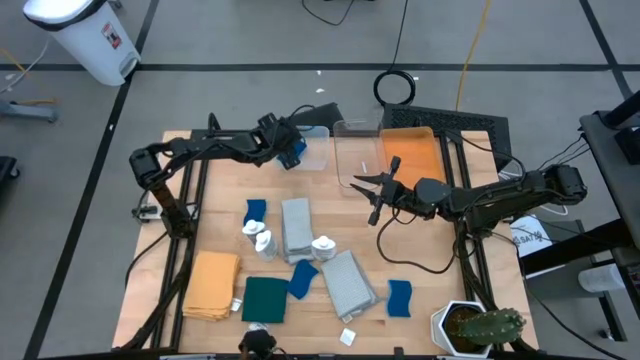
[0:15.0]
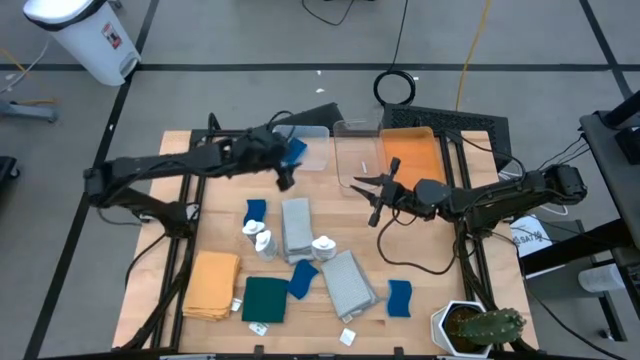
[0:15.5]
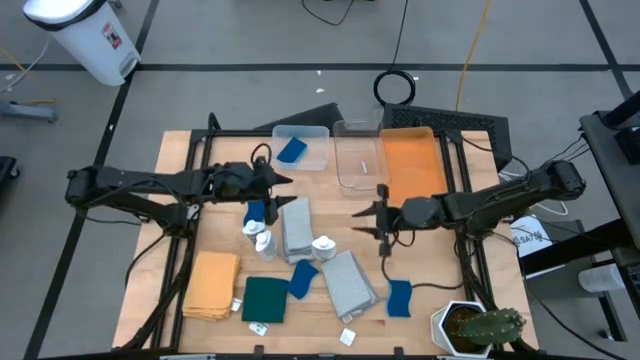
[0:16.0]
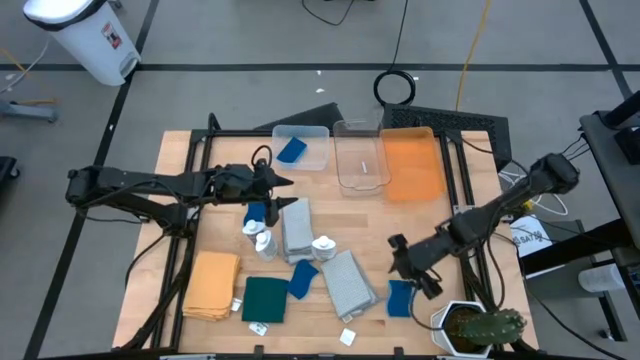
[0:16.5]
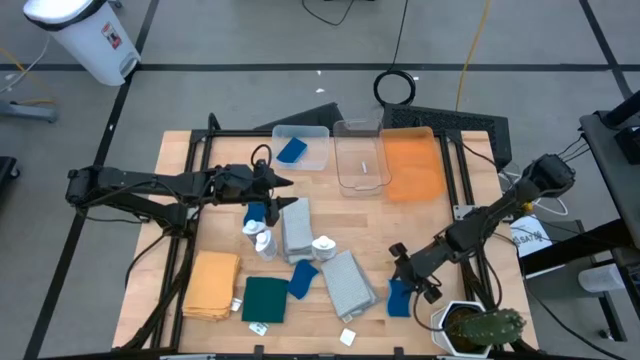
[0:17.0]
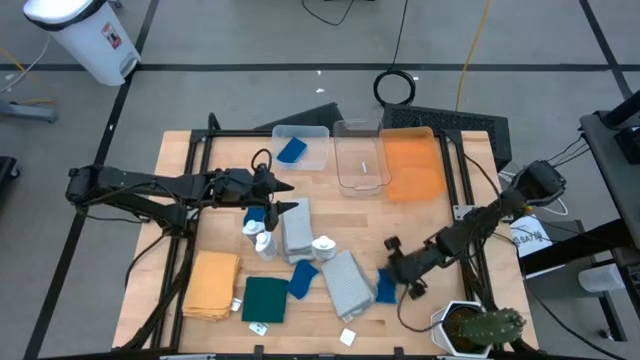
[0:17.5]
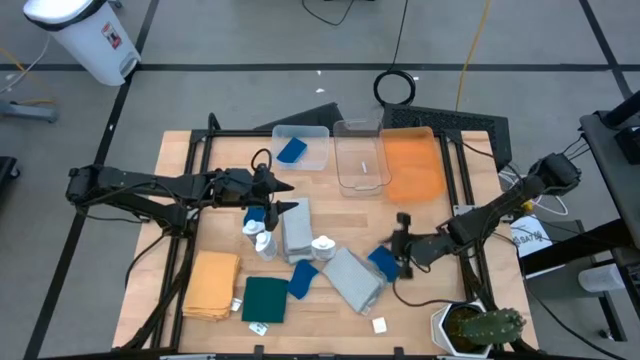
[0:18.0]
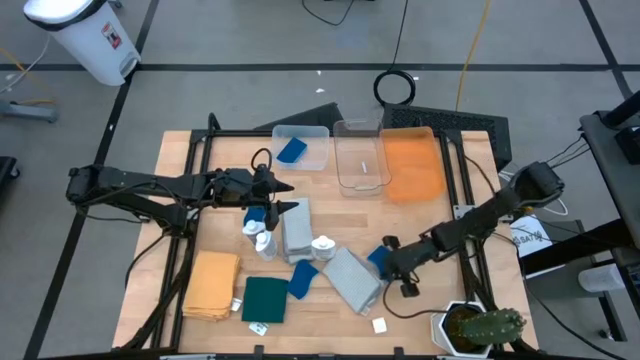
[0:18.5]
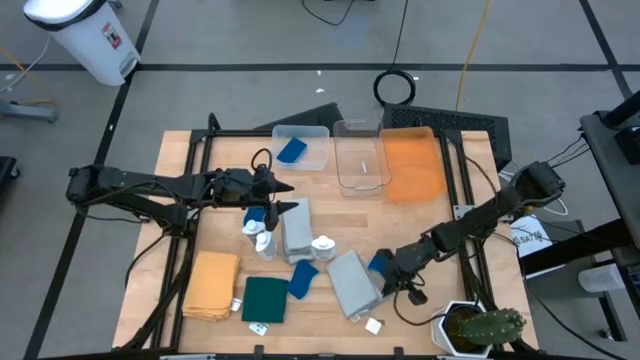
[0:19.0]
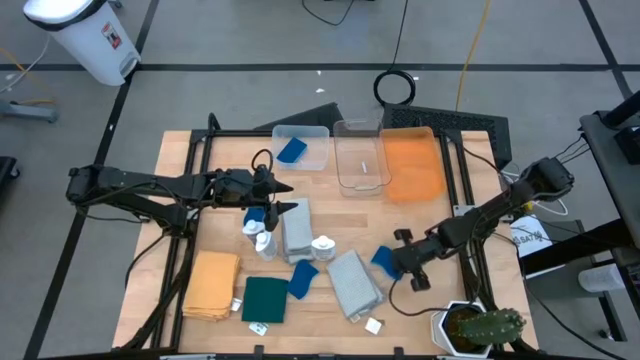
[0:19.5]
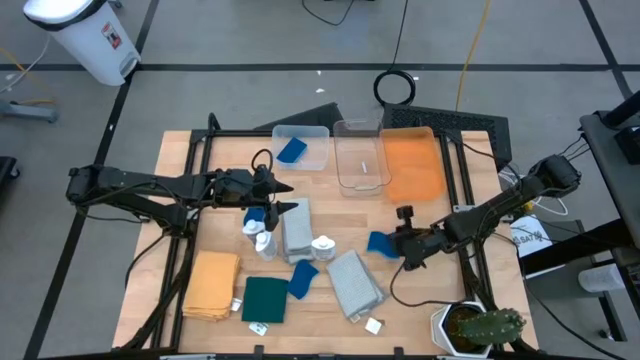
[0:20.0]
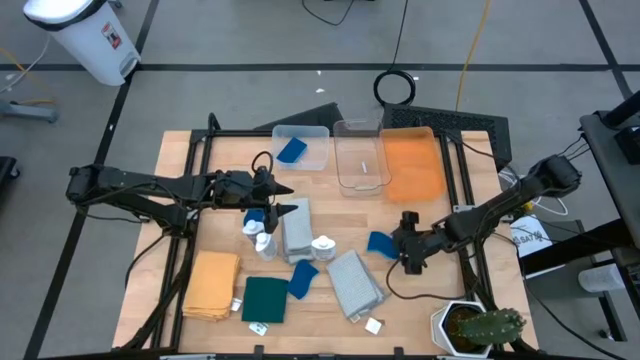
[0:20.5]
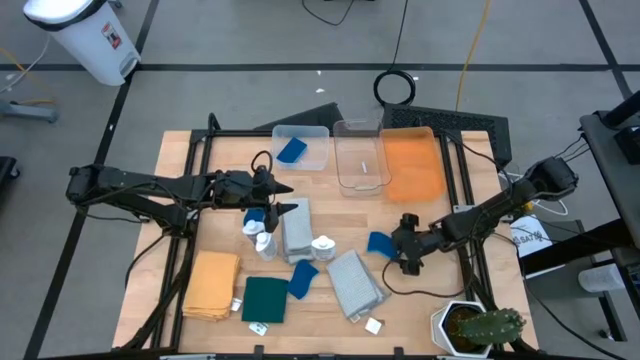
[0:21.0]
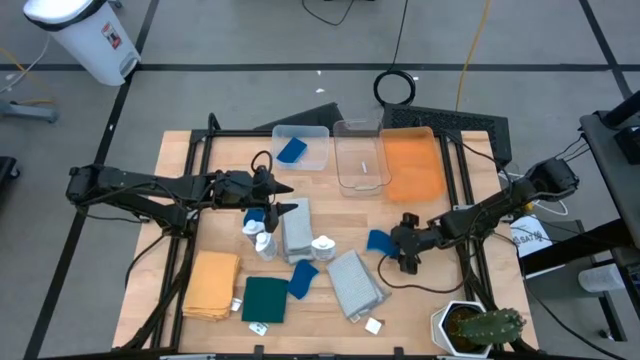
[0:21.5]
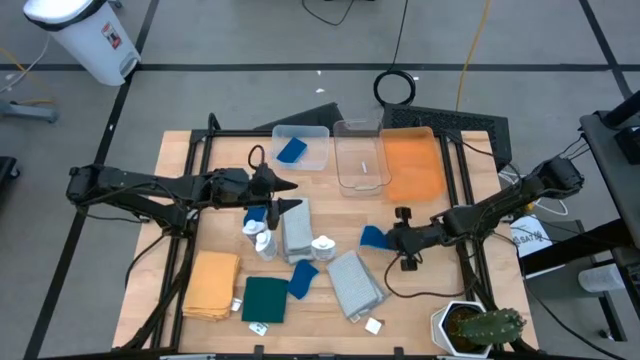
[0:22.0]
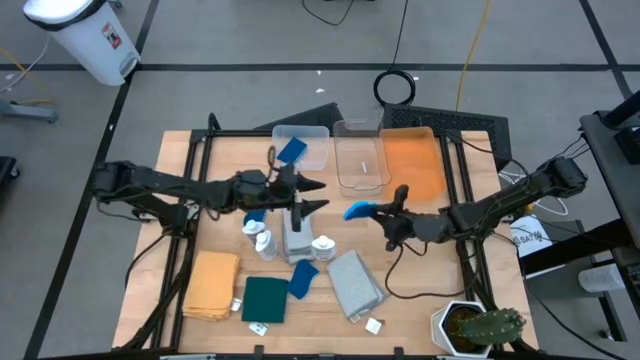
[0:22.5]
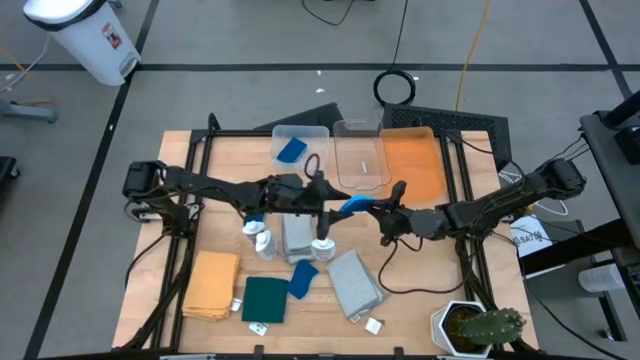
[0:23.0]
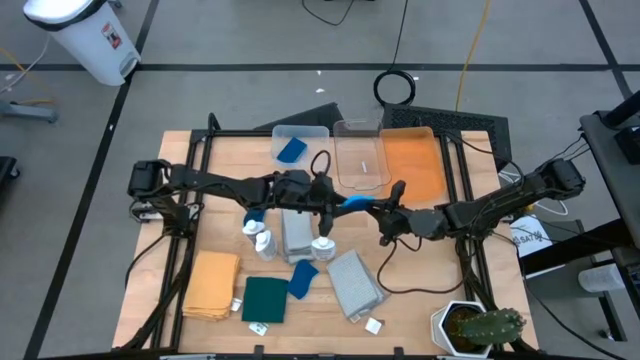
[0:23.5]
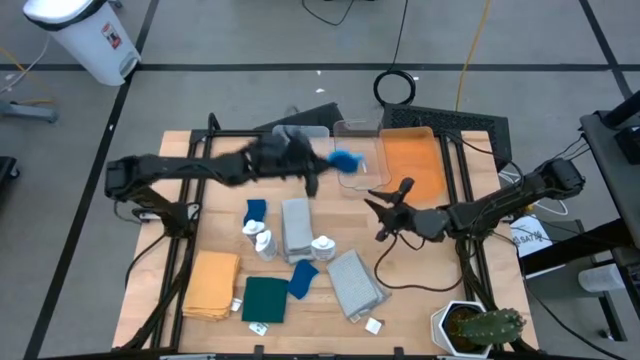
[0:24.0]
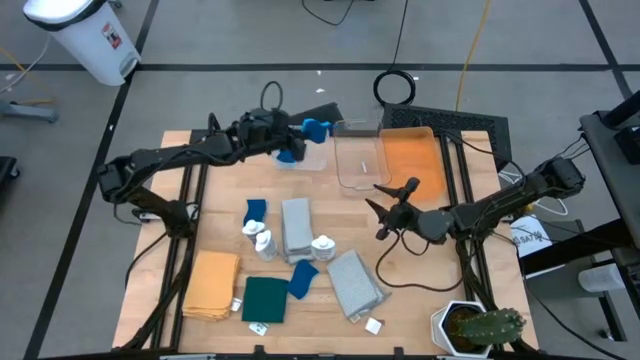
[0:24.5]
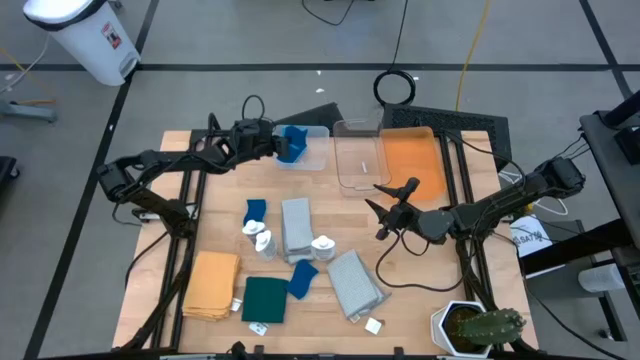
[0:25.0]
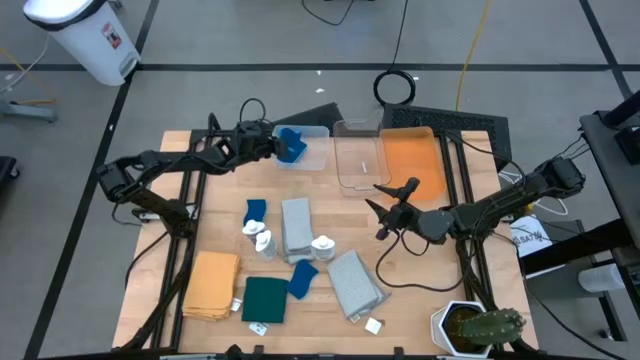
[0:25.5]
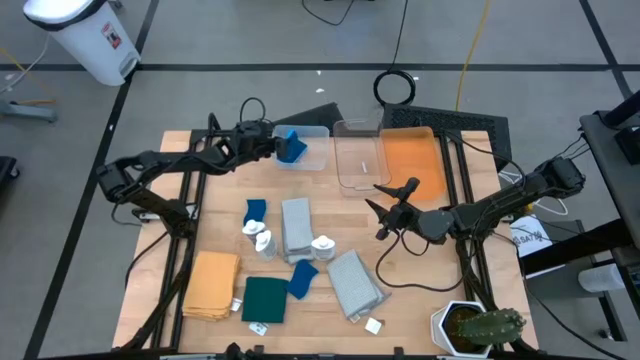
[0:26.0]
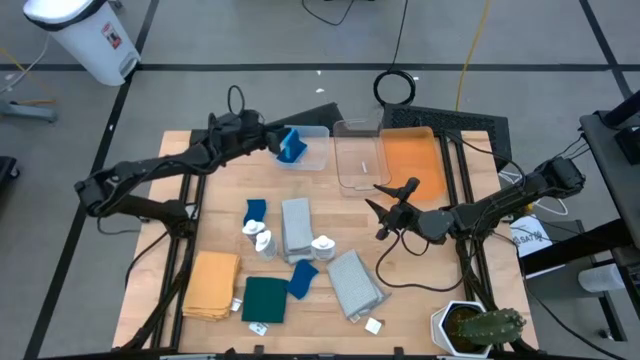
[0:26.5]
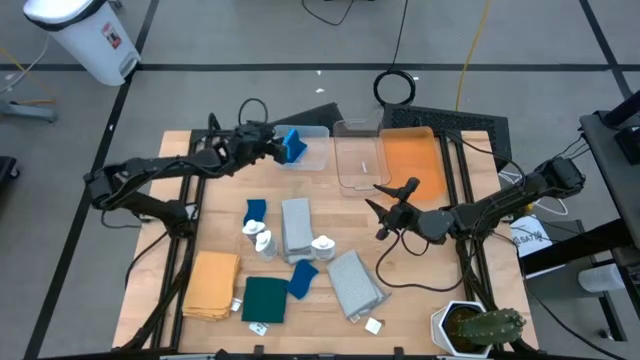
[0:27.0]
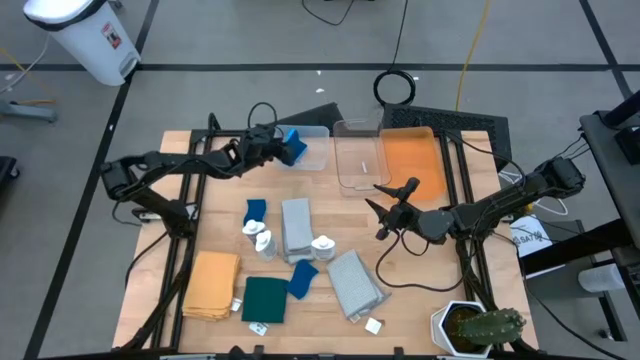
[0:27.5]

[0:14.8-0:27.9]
Task: Pick & Place Kitchen Items
Put the blue sponge into the white bin

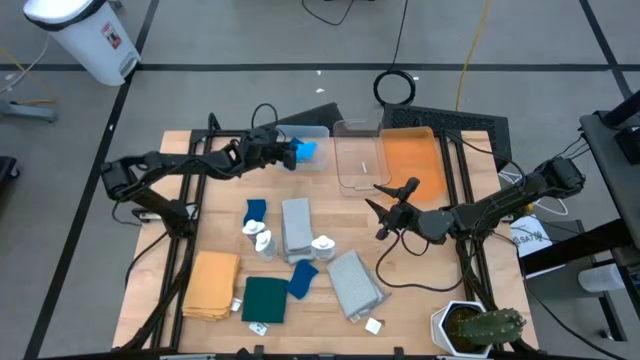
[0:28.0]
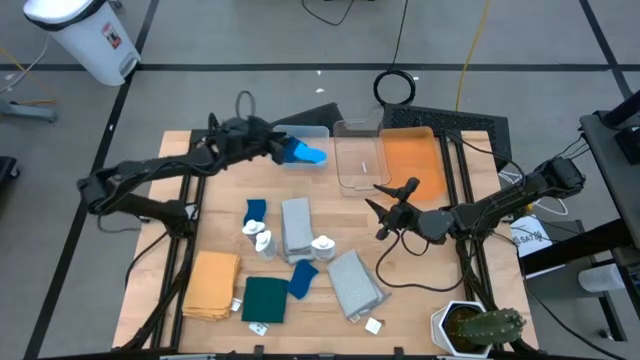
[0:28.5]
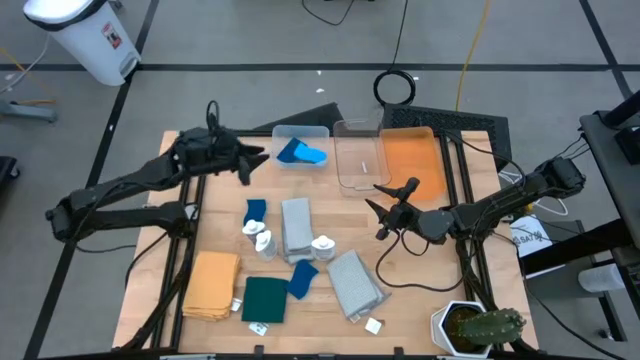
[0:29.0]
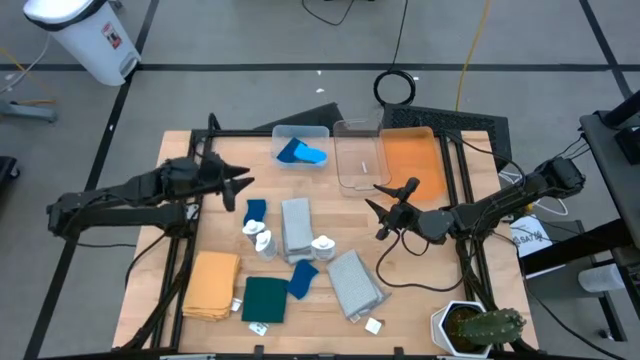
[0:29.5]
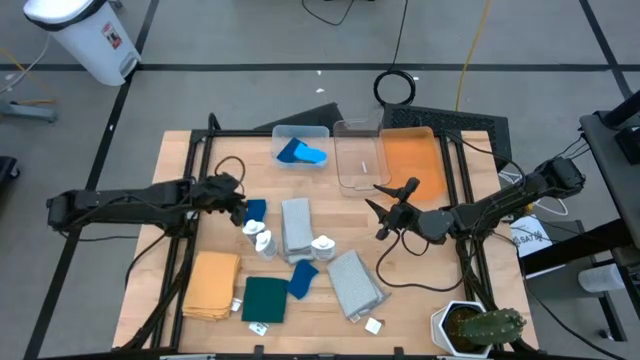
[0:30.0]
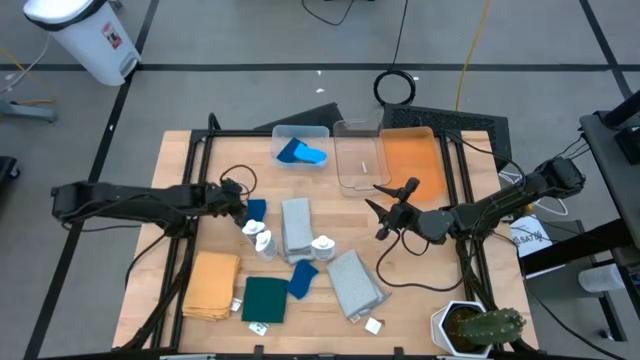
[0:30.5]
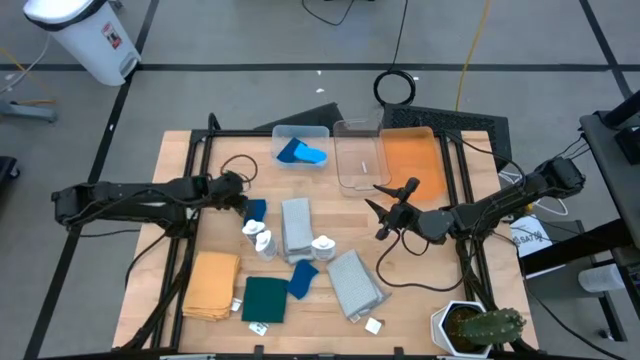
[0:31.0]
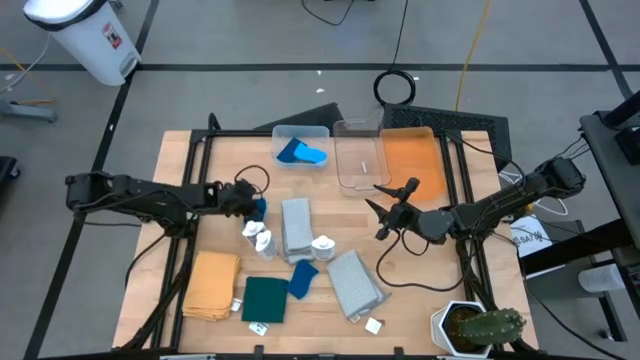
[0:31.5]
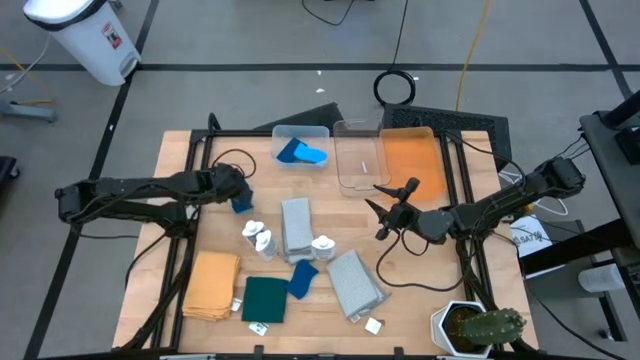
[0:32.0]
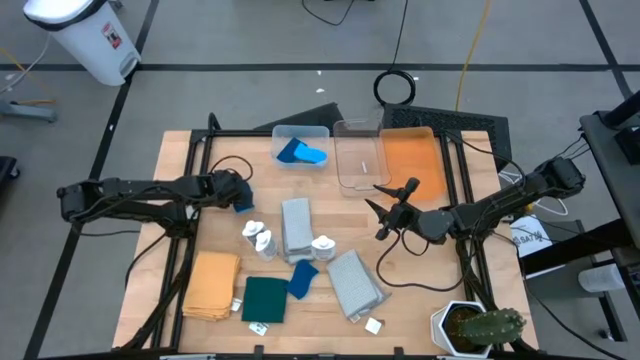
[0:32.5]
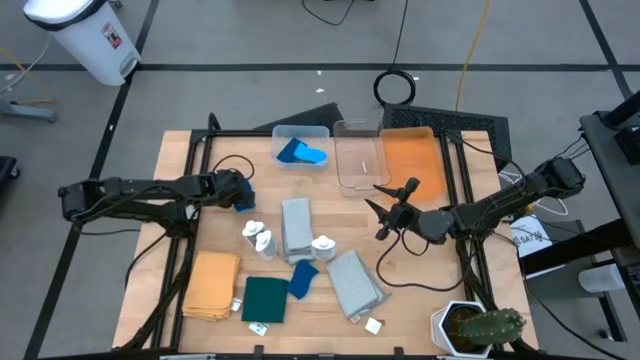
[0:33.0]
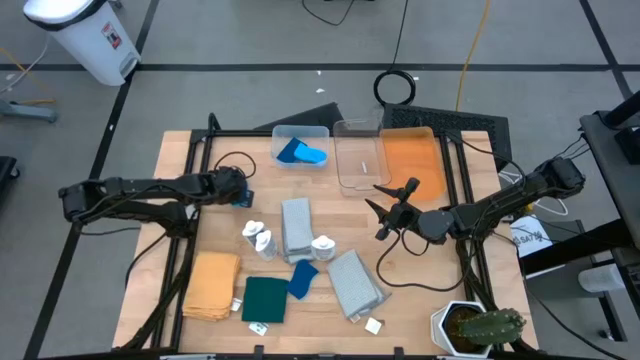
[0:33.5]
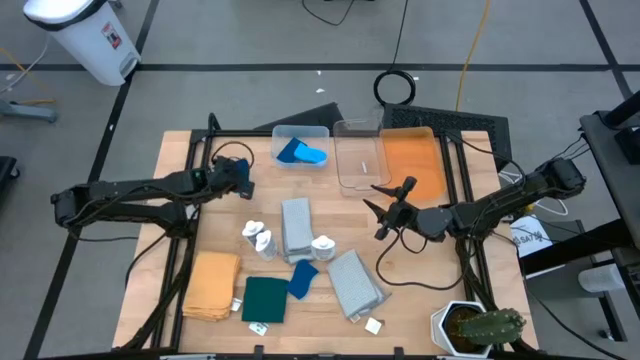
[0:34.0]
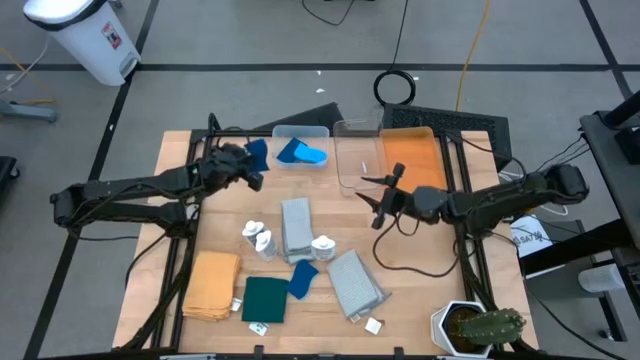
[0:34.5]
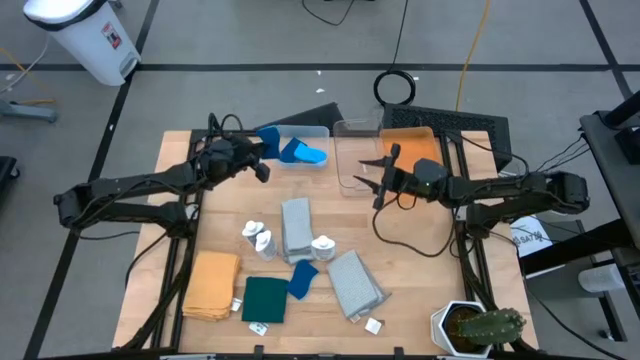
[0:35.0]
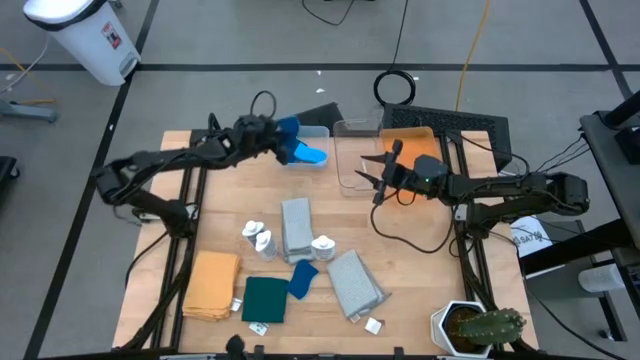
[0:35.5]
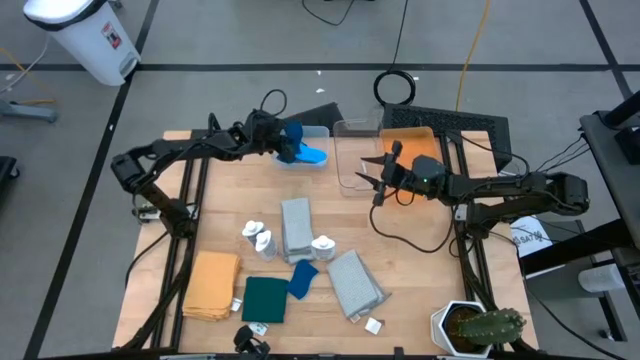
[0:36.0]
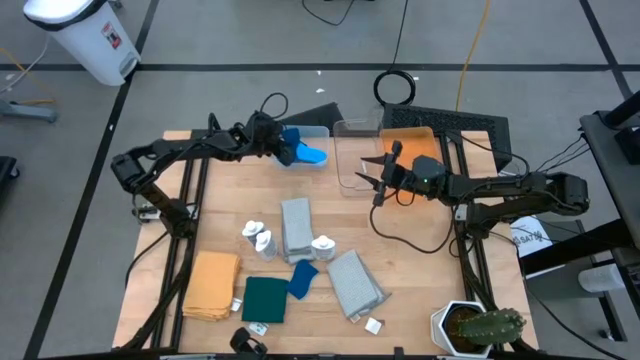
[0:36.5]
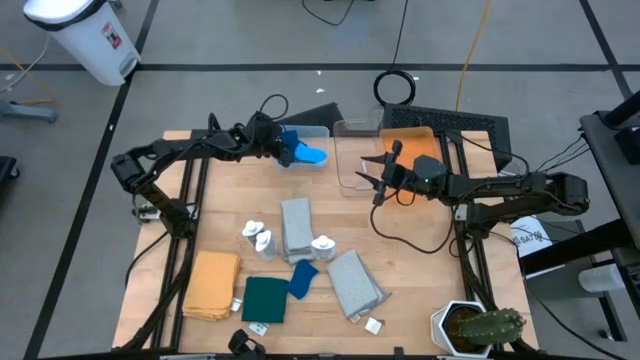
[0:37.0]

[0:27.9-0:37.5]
Put the blue sponge into the white bin
